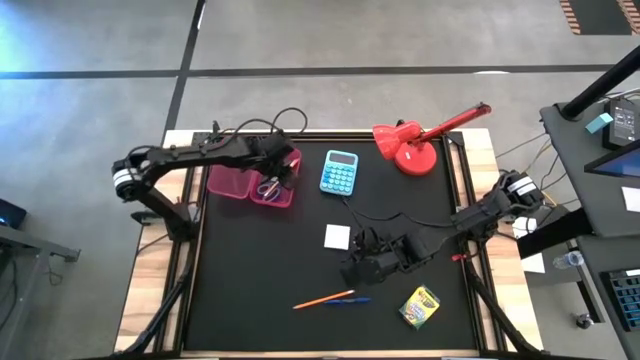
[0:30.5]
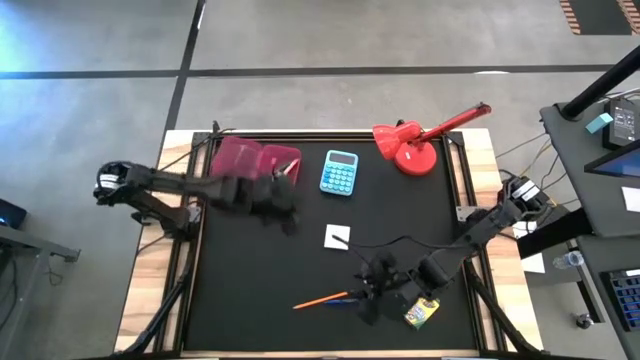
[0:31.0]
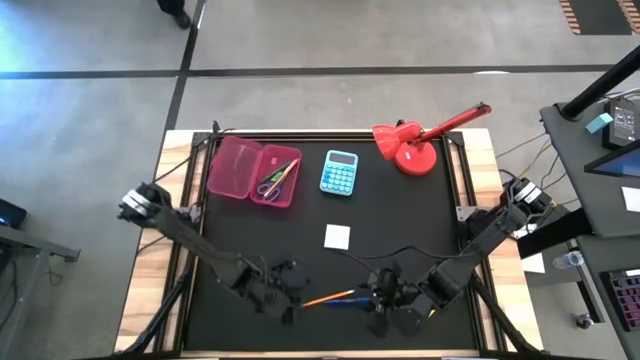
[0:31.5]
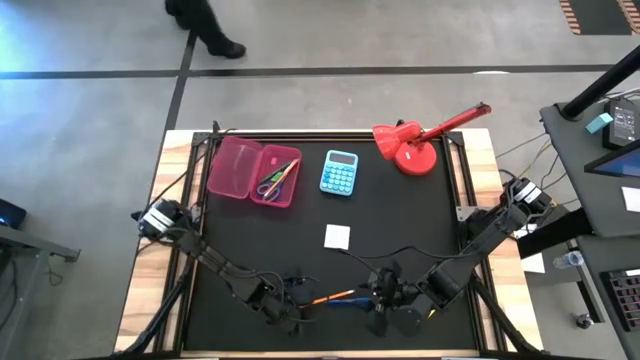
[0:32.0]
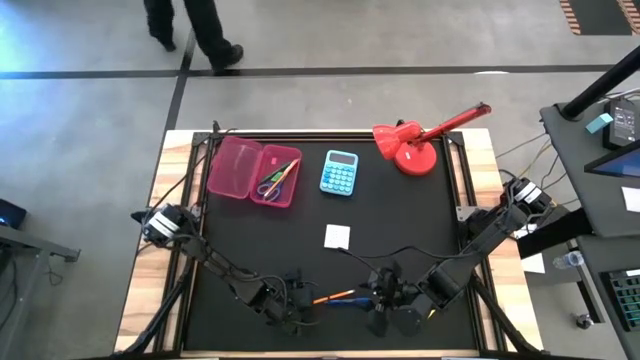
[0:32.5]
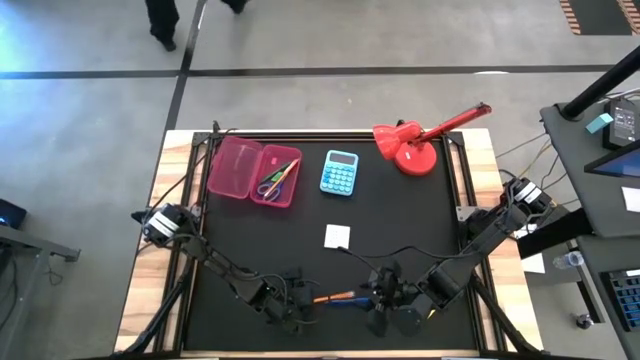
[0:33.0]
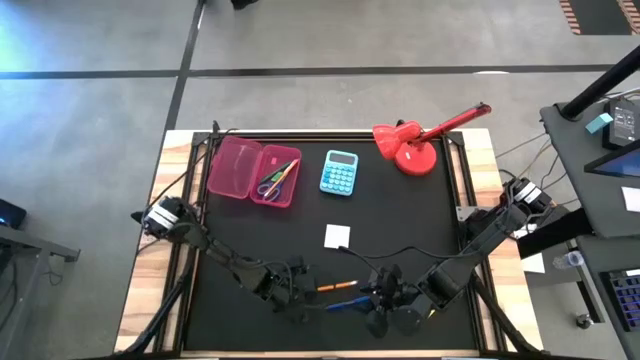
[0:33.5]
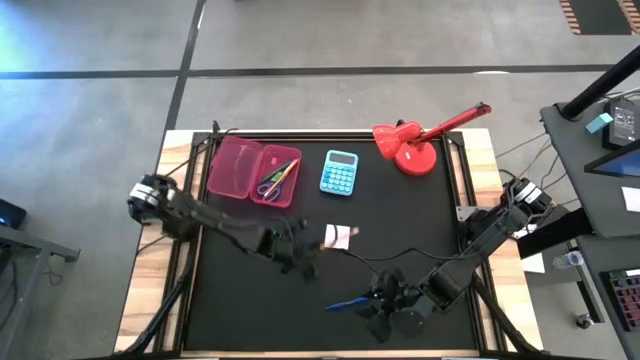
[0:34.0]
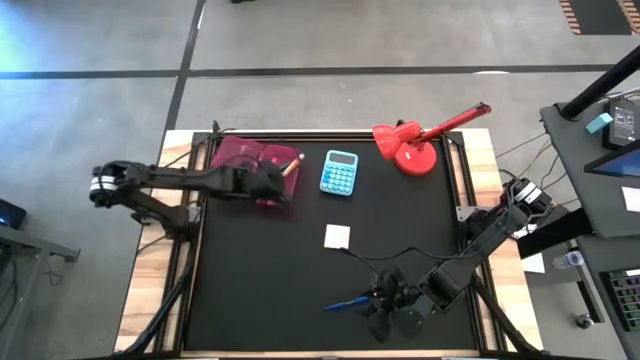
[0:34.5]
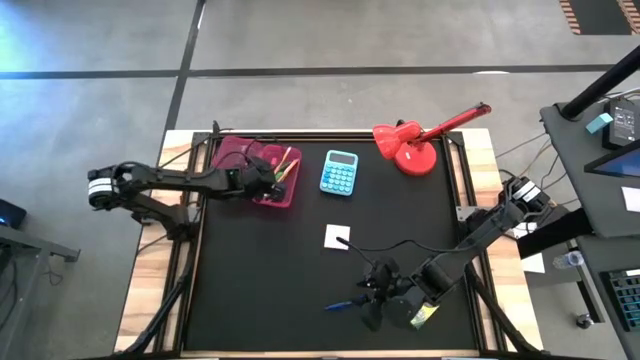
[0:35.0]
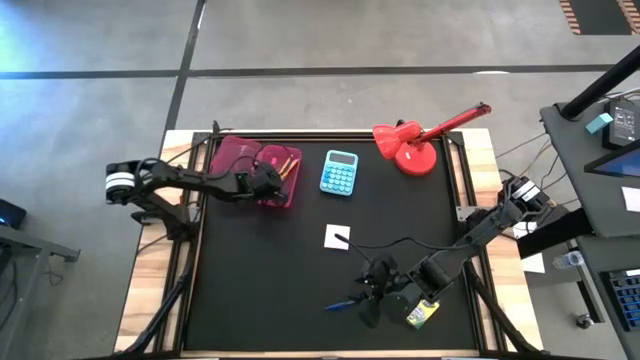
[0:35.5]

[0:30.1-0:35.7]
Task: Pack school essentials
Put the orange pencil into the pink supply box

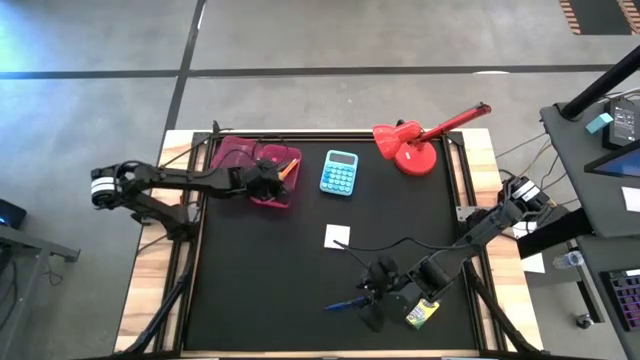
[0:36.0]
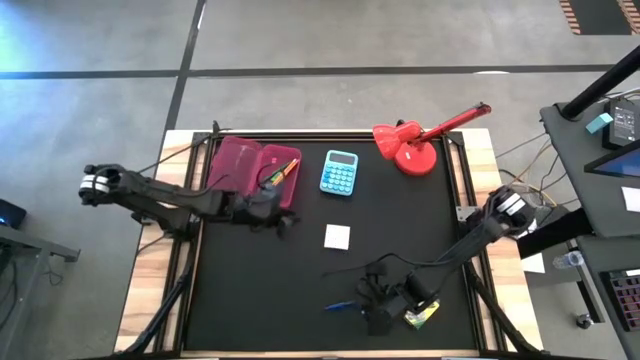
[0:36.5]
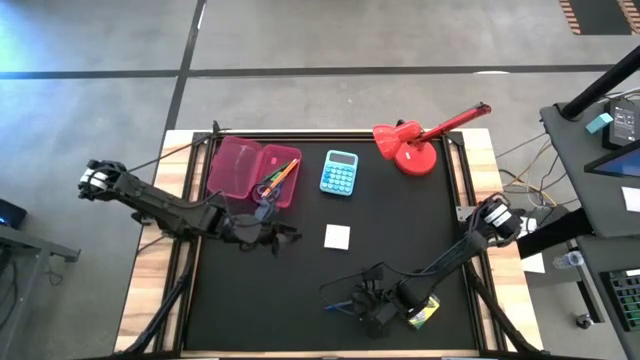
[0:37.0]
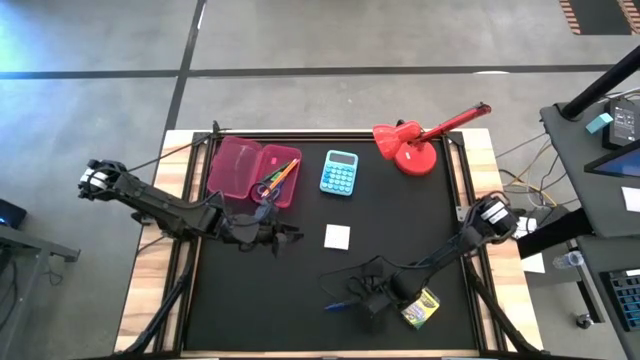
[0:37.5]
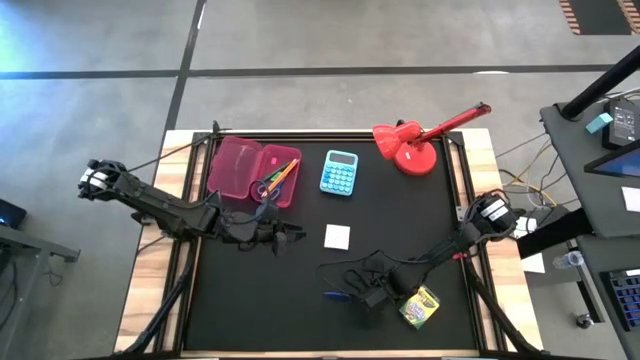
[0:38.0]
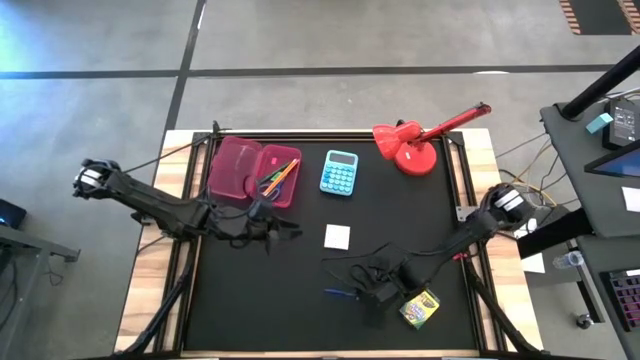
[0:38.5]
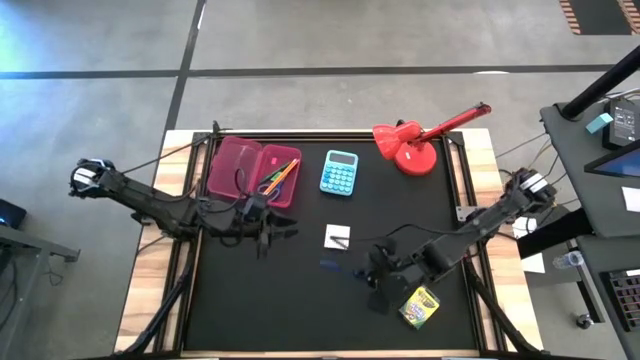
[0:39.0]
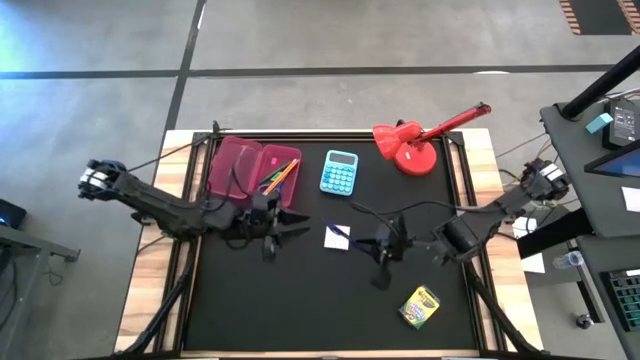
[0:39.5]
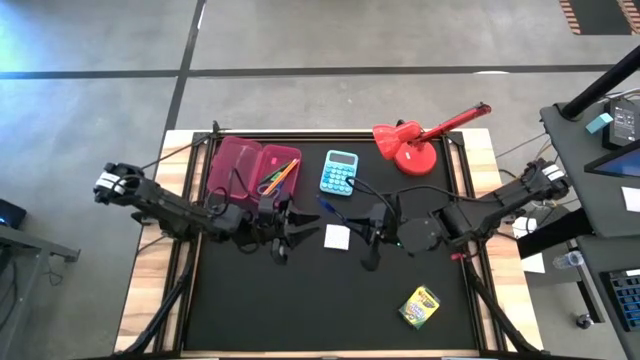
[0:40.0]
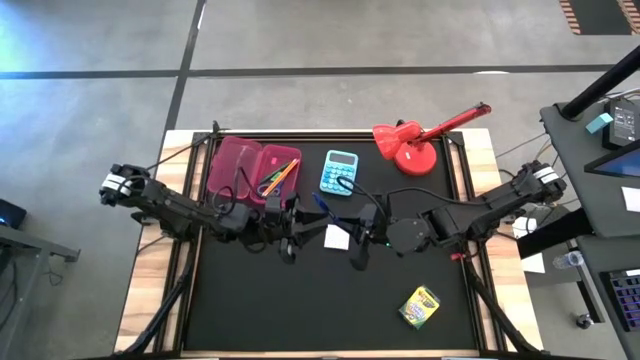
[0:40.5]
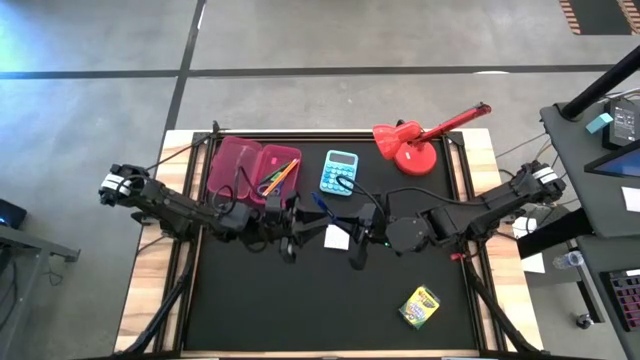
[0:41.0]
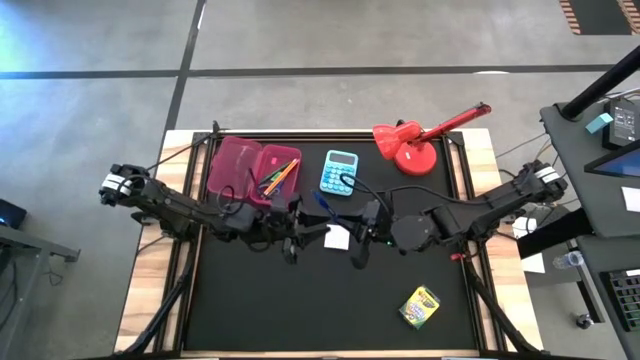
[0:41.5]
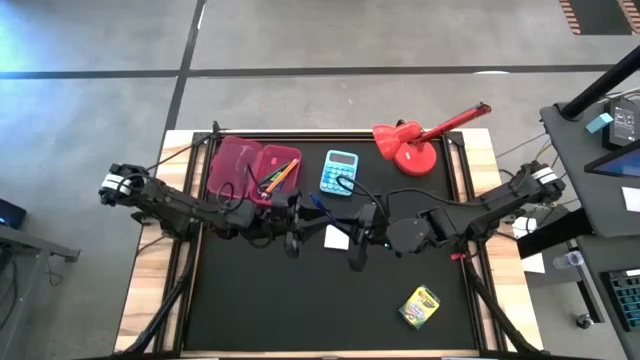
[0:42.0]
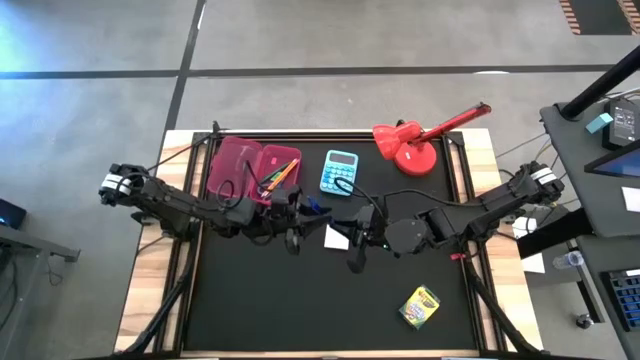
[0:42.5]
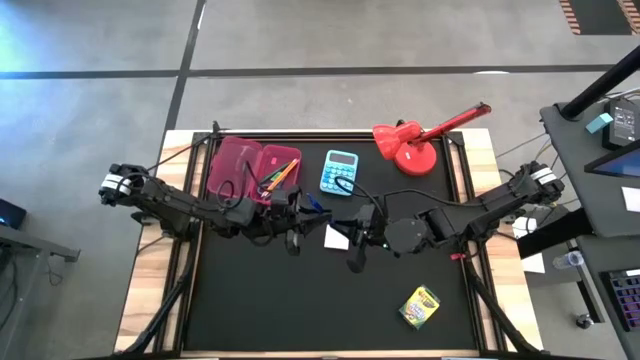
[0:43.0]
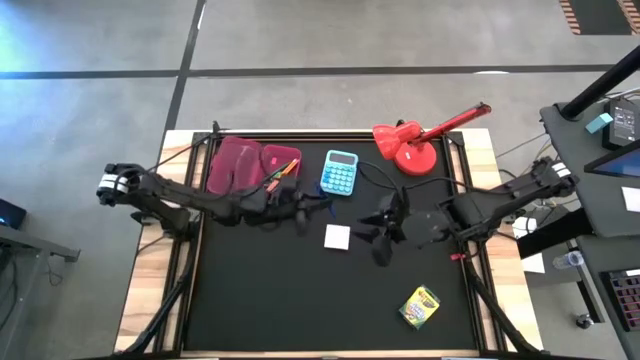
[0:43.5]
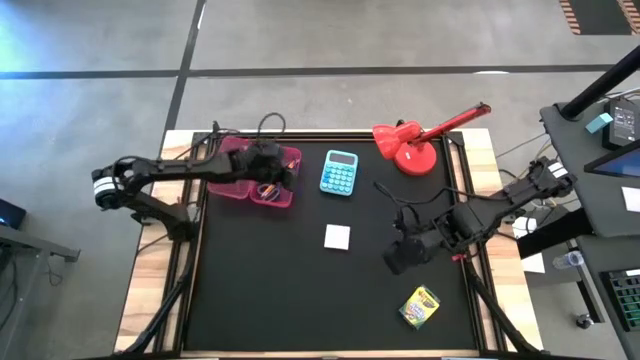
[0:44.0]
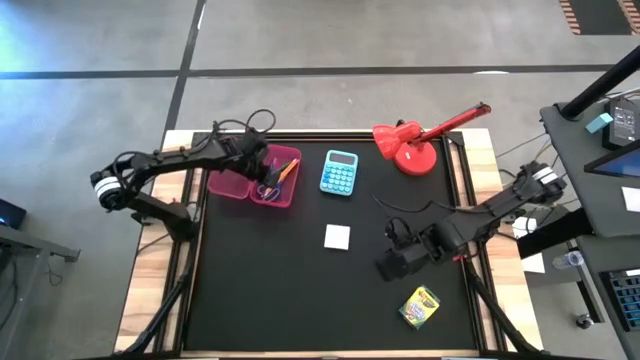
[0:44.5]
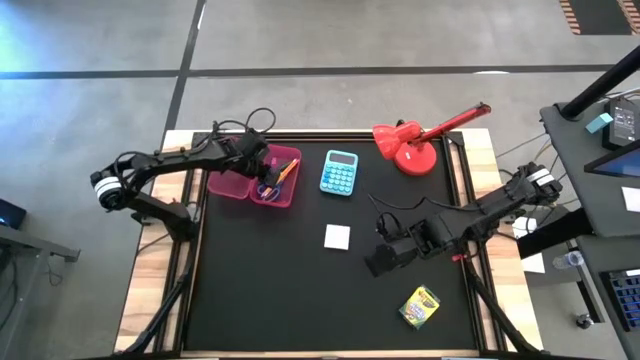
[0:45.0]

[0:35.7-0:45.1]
Put the blue pen into the pink supply box

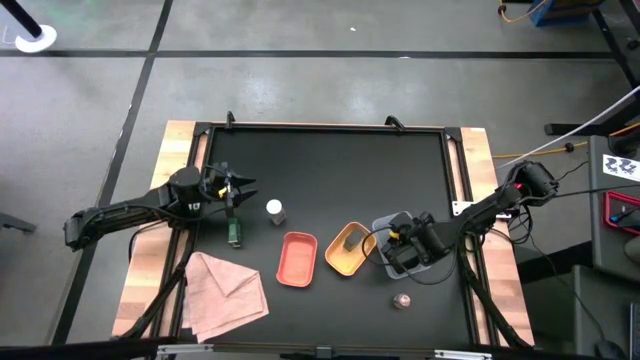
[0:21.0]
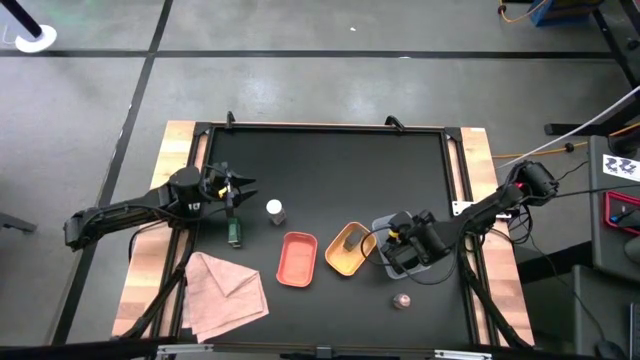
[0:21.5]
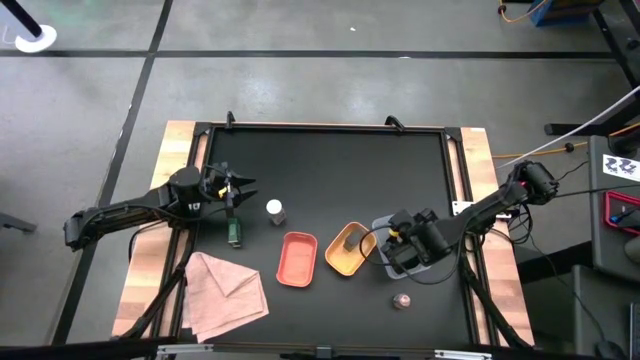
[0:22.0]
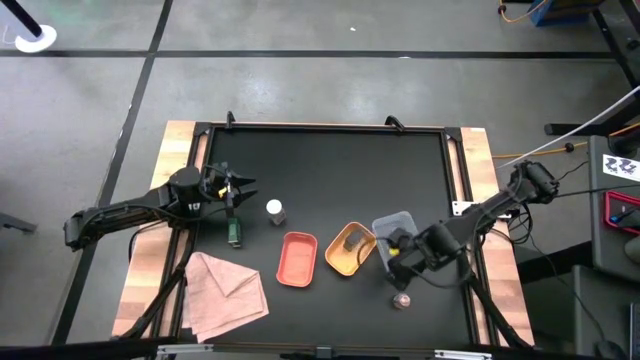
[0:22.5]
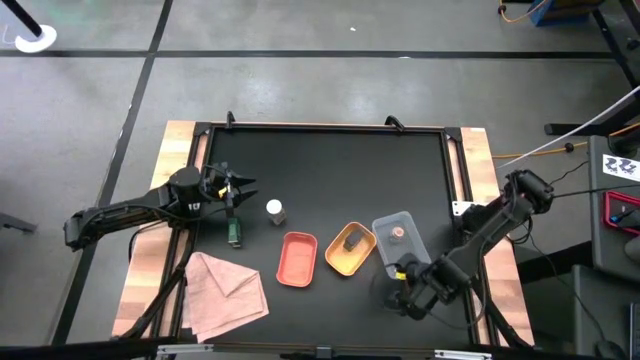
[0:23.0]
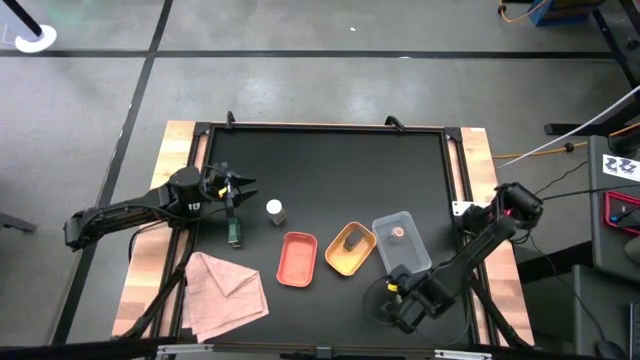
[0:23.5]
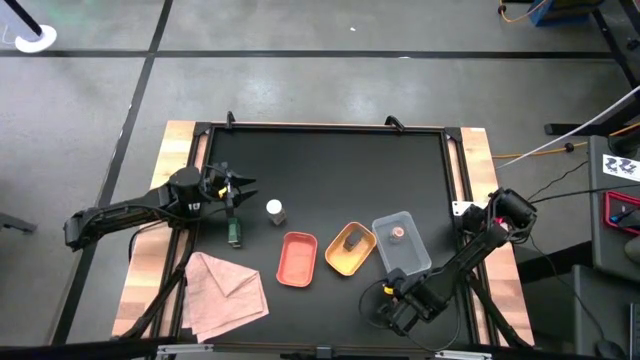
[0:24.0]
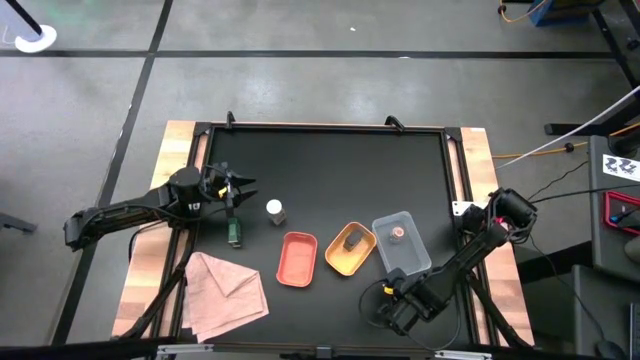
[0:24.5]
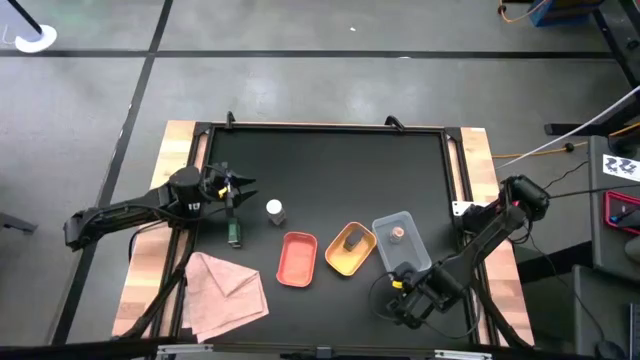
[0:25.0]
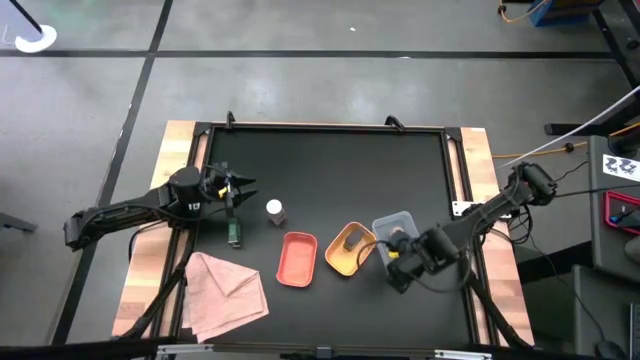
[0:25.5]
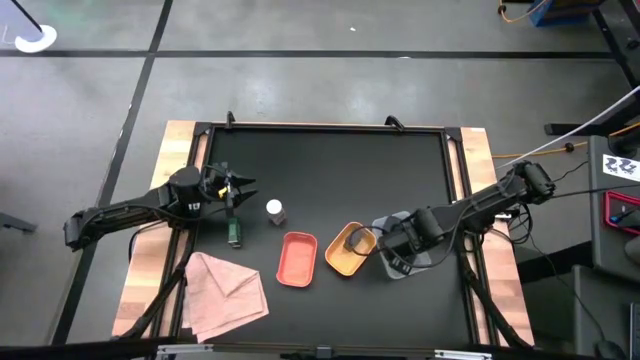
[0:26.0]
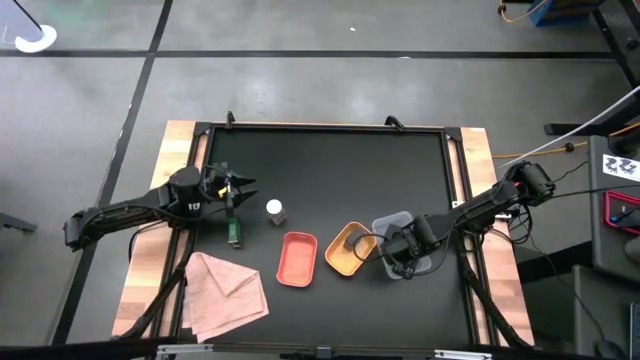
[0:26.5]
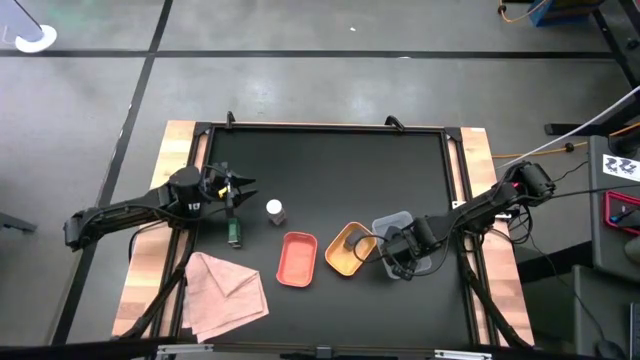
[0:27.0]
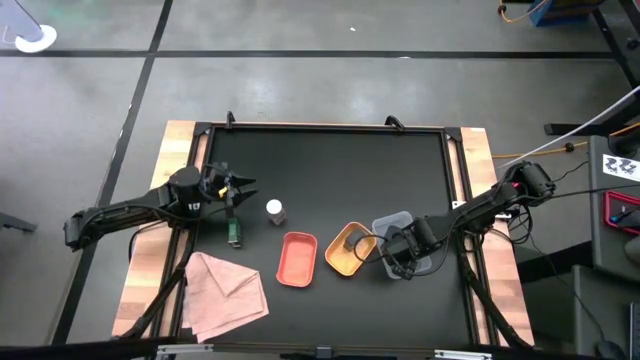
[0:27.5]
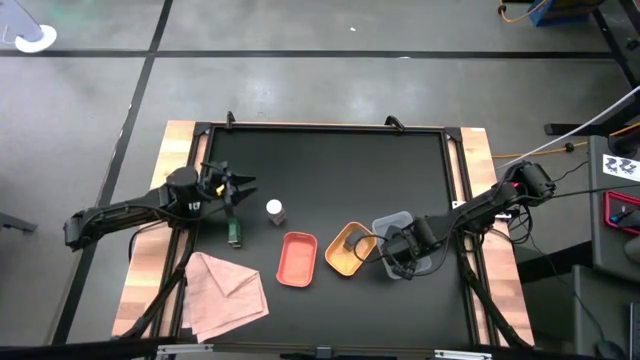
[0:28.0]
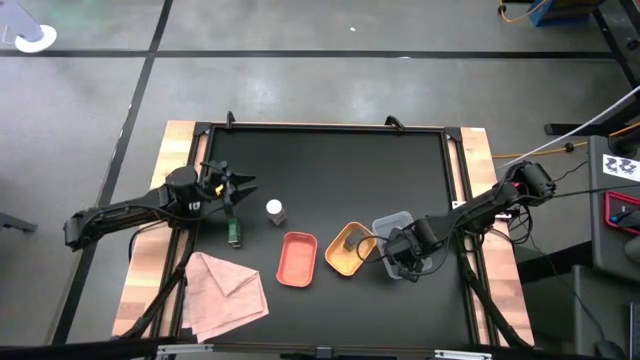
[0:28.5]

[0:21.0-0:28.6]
Task: Sort spices by type
Put the brown spice bottle into the transparent bin
